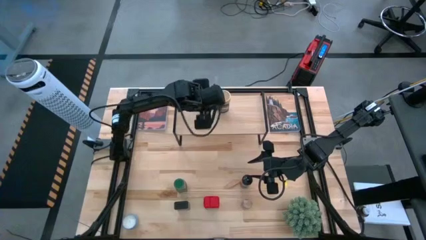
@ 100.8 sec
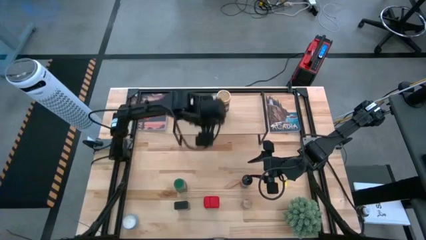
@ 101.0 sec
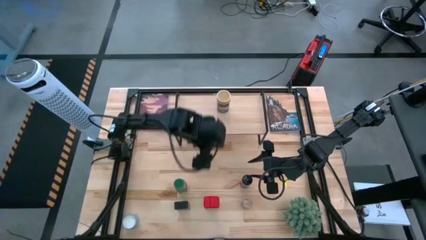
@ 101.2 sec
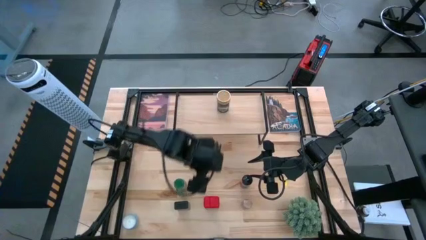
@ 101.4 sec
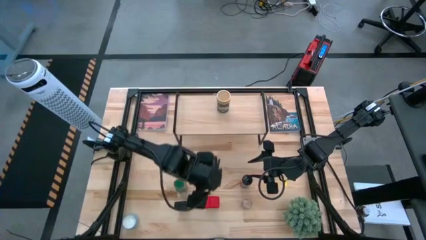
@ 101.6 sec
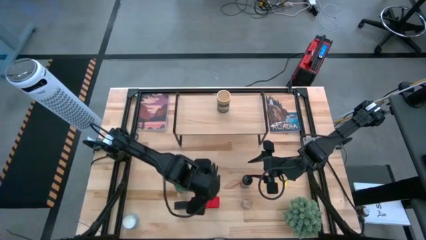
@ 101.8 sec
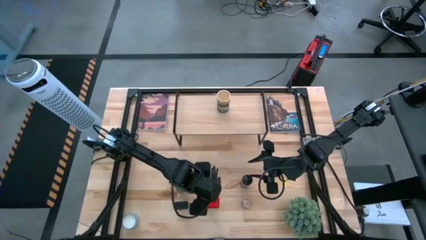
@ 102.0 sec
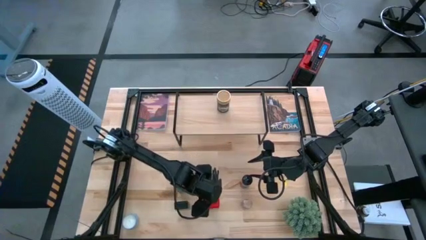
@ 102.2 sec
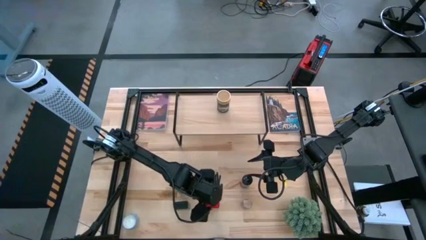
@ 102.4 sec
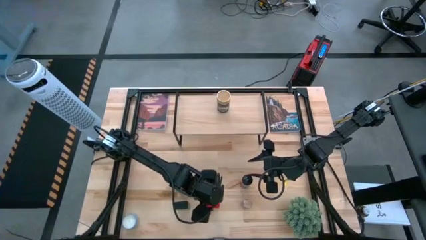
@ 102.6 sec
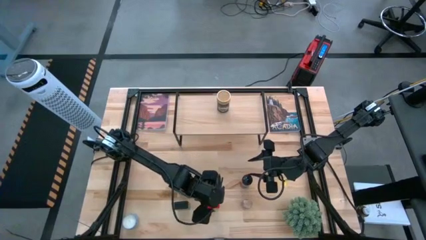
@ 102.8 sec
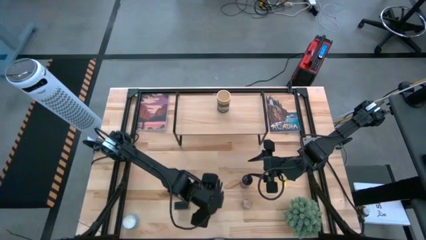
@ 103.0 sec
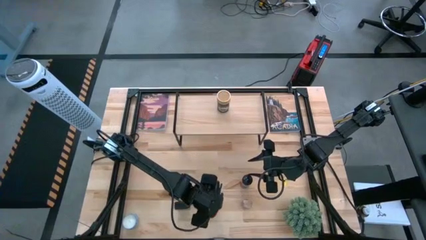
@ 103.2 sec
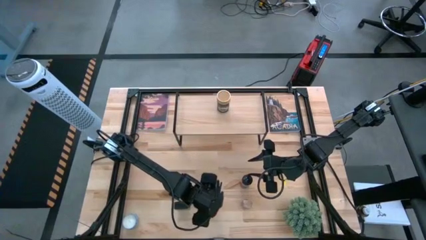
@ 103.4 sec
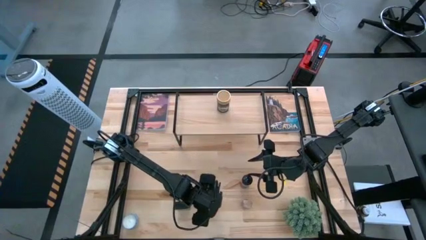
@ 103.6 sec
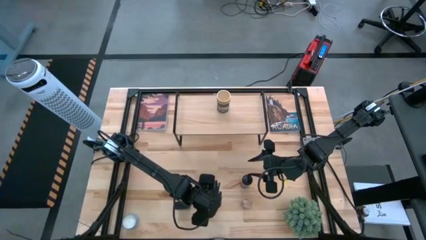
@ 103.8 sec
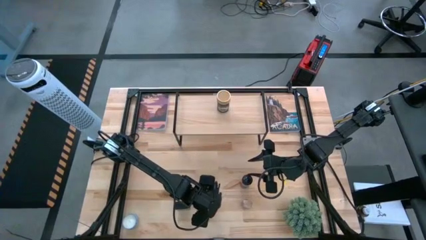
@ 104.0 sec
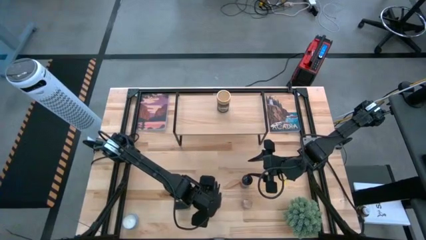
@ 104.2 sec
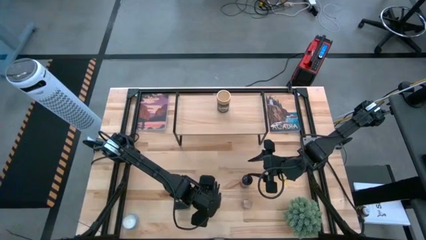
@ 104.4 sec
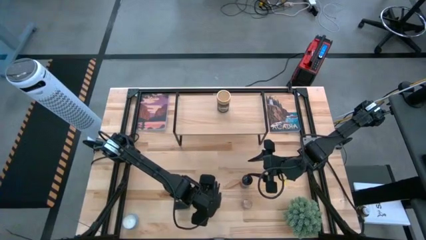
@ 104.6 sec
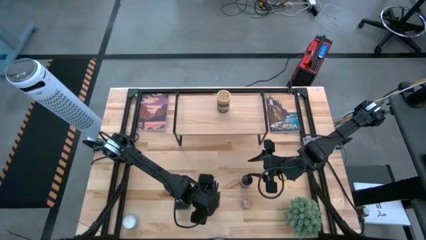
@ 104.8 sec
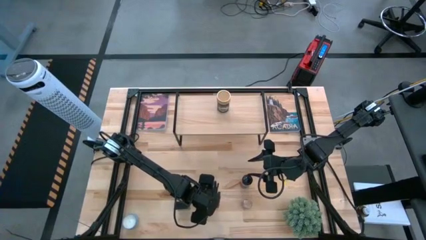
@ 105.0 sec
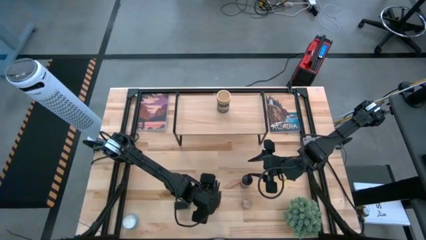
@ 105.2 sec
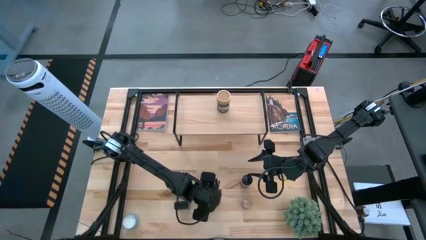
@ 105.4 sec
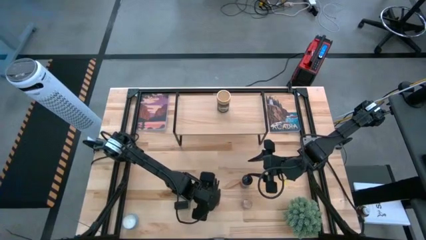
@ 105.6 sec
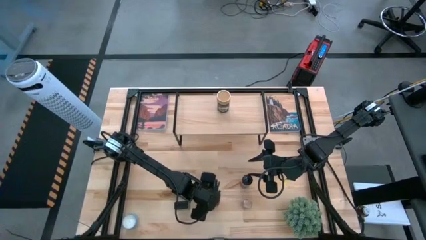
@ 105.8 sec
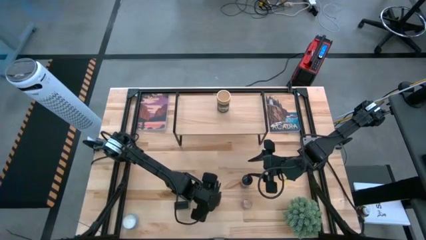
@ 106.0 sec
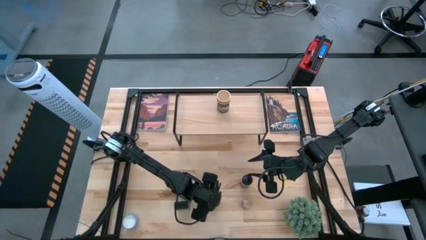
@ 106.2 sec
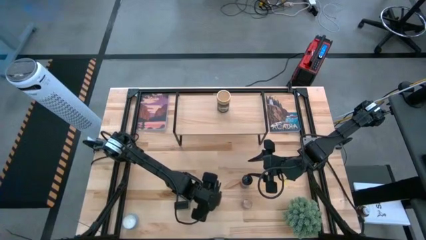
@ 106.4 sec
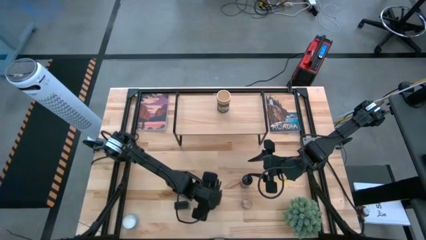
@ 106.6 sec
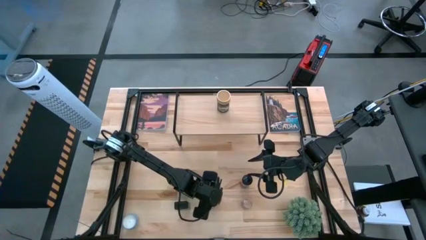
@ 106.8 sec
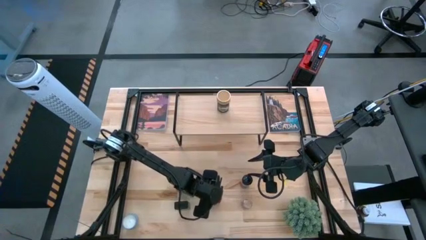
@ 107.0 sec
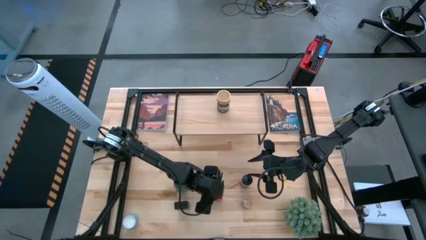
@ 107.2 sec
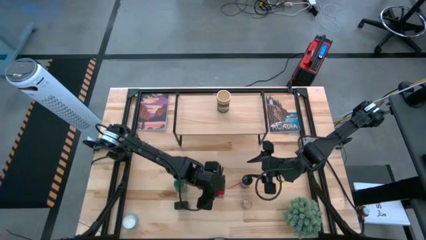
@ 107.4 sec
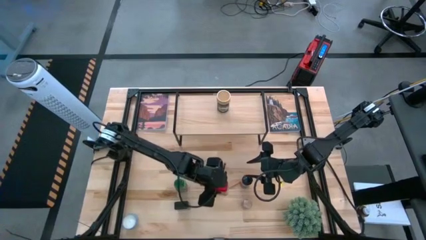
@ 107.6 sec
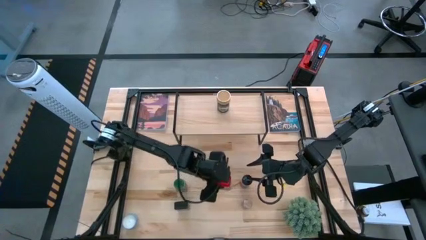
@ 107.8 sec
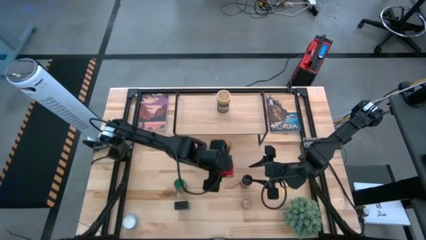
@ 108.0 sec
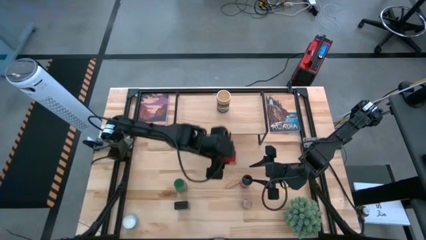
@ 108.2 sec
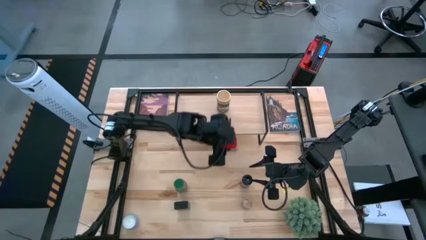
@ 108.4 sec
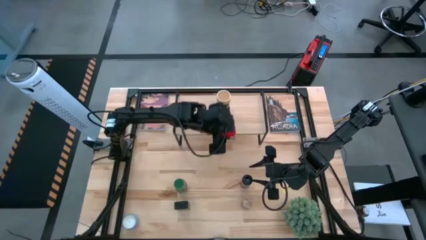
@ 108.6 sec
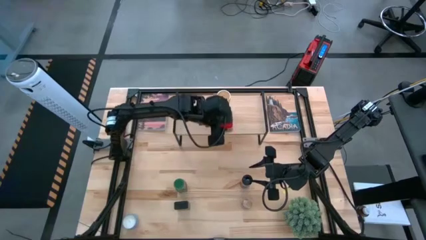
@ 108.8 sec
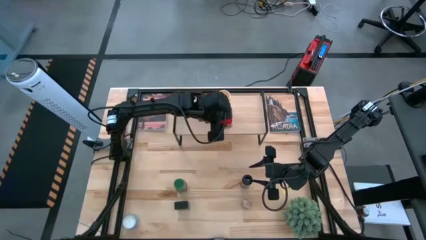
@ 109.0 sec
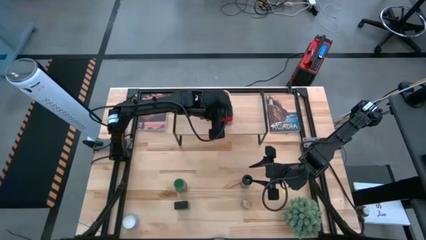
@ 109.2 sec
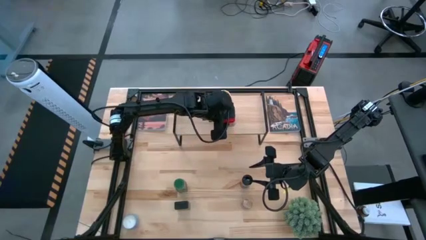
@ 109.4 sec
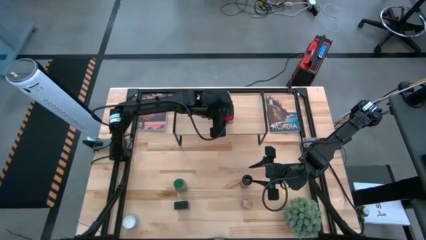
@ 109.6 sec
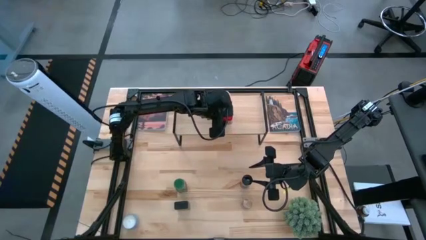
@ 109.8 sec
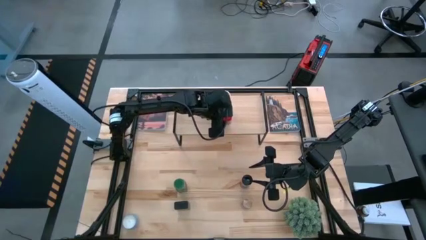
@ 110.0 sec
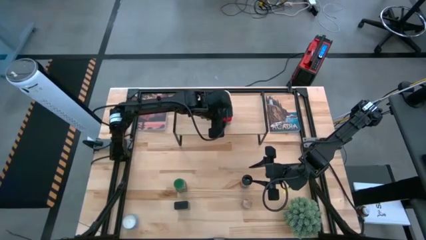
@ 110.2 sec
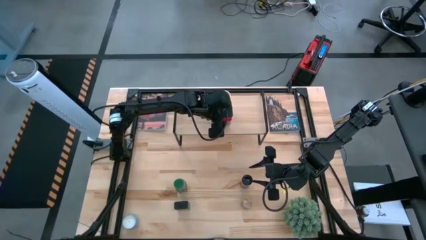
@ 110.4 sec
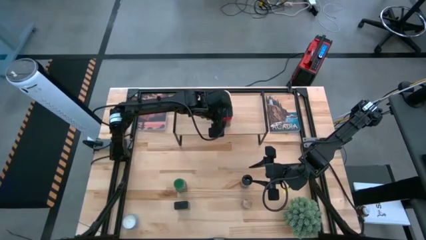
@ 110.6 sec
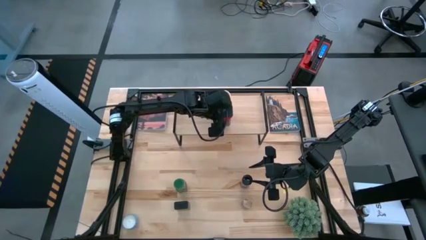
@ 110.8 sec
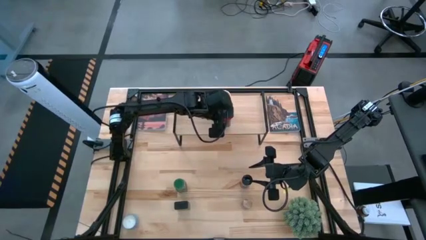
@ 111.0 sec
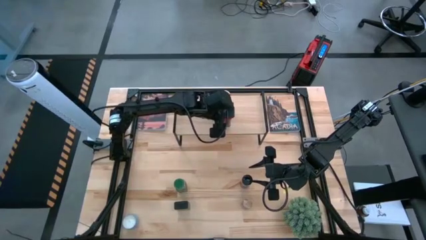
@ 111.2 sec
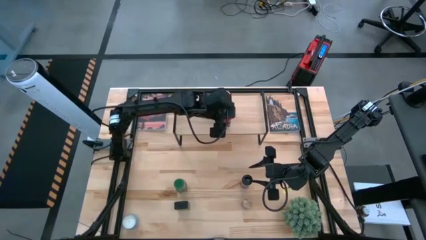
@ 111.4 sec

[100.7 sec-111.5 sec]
Task: Shelf spices
Put the red seasoning can on the shelf

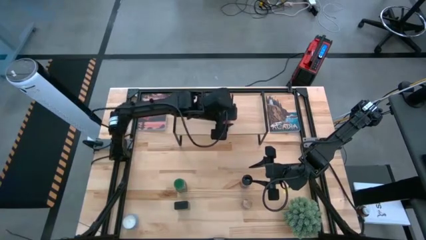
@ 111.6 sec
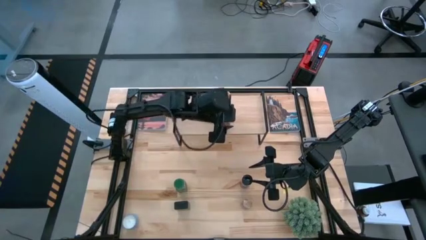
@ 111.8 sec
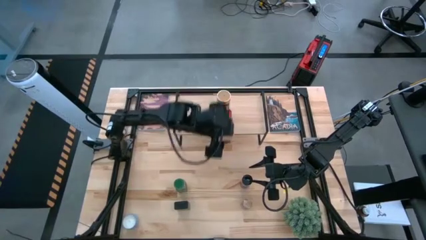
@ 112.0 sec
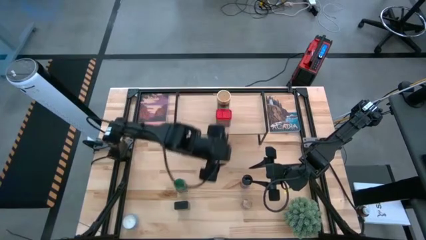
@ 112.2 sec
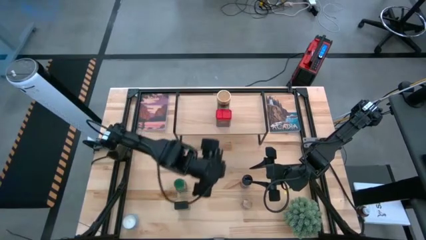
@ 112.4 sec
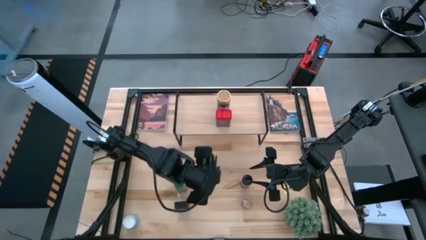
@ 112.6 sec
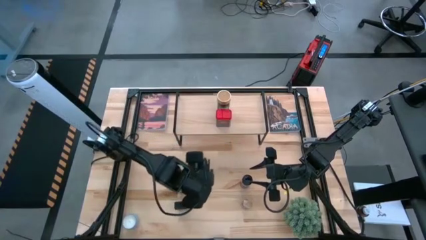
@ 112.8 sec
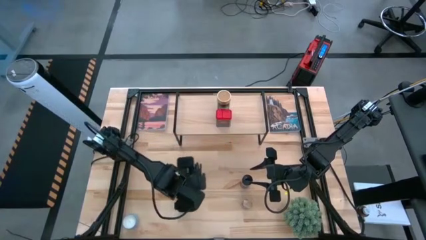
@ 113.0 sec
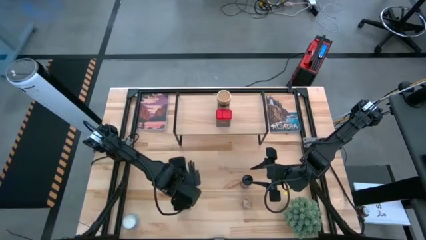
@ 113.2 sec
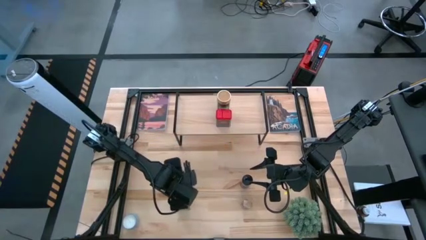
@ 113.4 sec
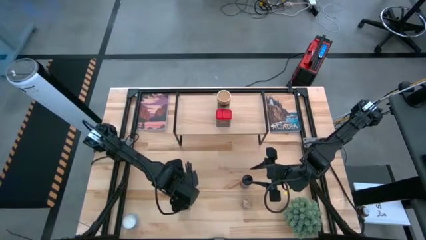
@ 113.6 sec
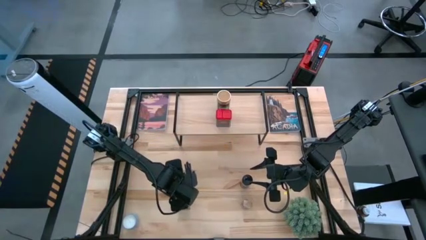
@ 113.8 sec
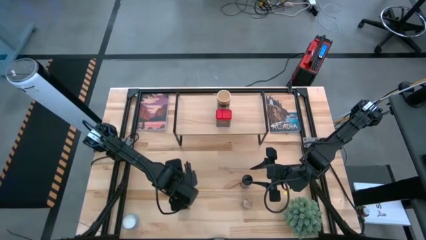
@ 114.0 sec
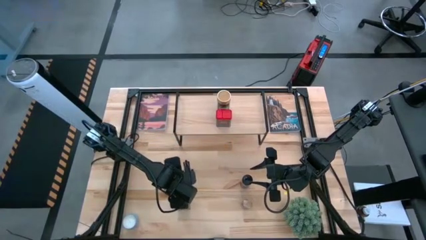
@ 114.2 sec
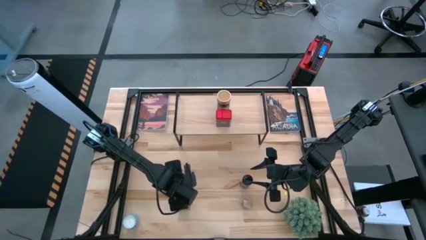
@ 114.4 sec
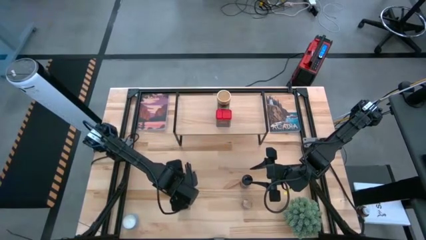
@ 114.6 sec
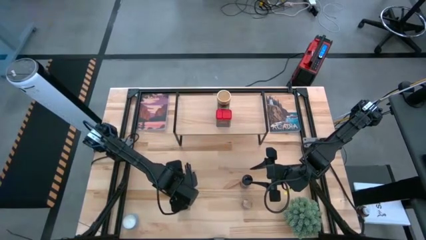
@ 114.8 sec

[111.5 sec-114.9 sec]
Put the green seasoning bottle on the shelf

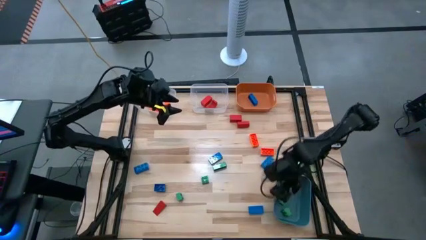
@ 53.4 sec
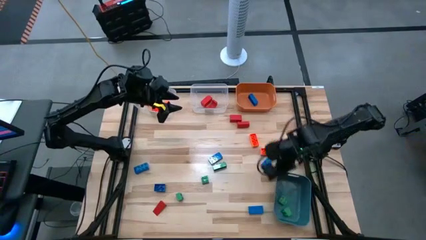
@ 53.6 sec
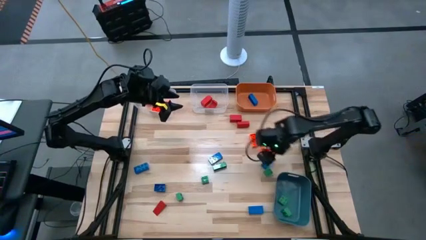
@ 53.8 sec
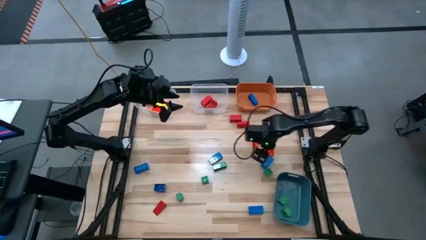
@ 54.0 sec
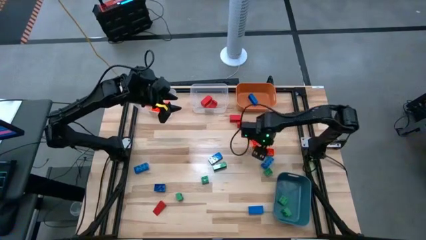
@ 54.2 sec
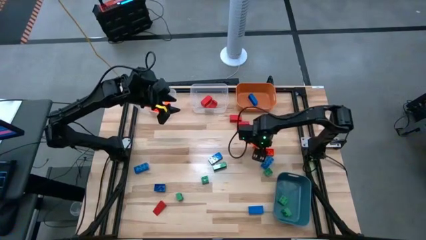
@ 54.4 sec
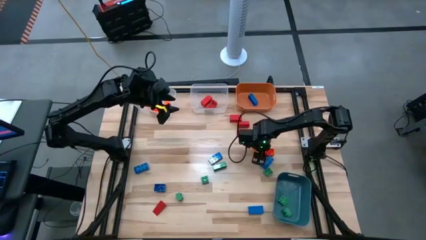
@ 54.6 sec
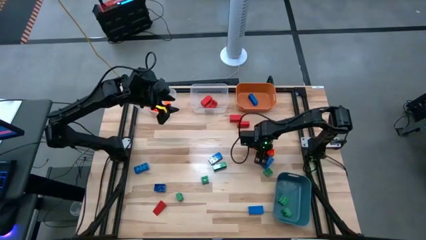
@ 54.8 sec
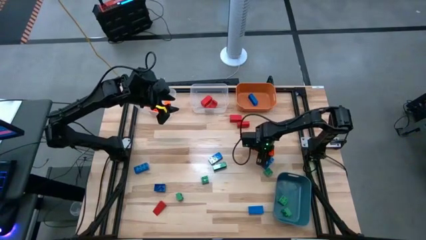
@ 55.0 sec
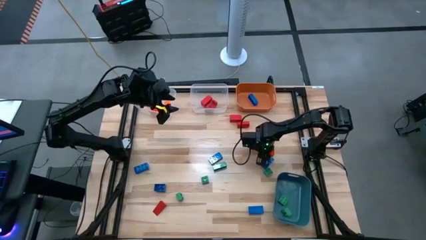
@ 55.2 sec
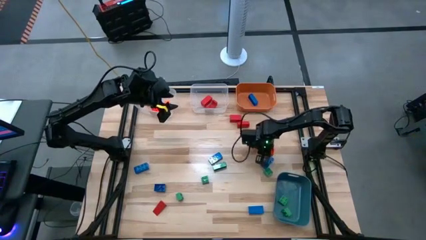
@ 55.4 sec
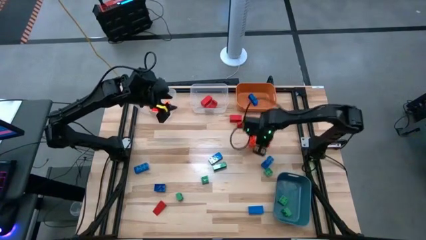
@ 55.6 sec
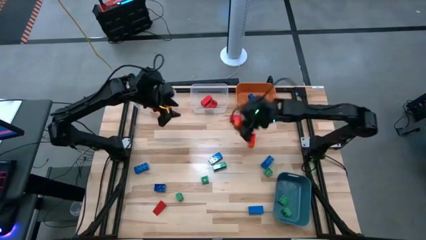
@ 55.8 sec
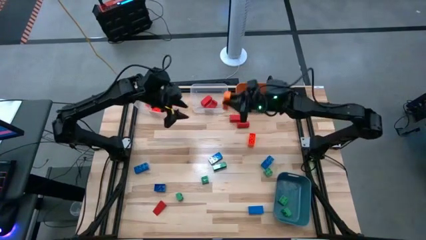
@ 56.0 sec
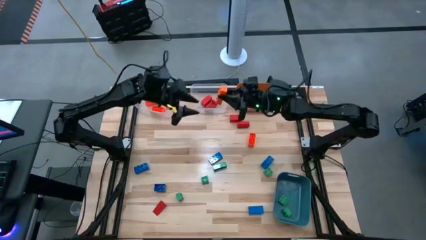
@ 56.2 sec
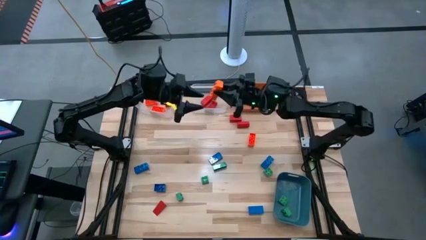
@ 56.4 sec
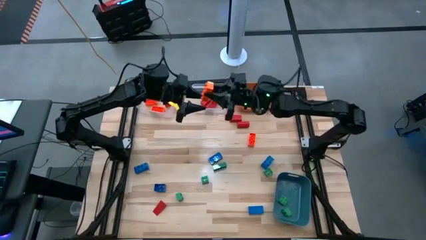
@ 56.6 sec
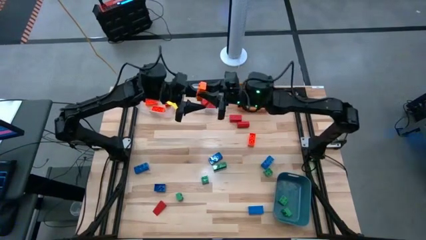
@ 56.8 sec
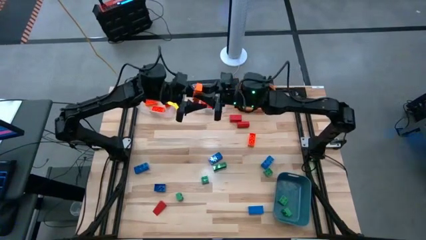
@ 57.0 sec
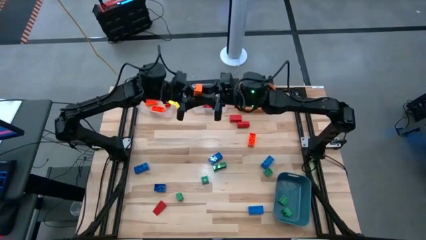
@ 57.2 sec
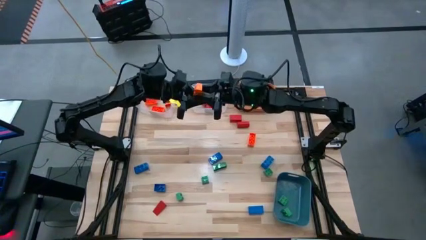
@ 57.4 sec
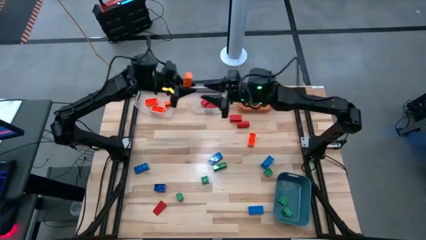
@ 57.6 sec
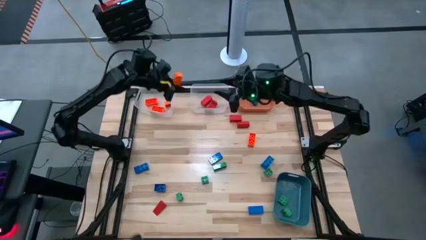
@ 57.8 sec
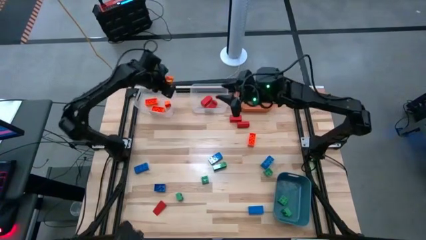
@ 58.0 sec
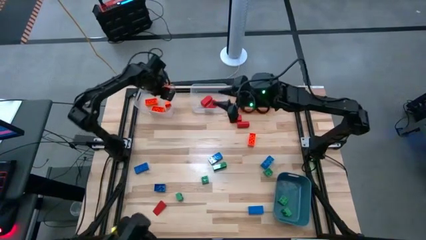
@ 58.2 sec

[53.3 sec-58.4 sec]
Task: Sort blocks
Put the orange game piece into the left transparent bin
